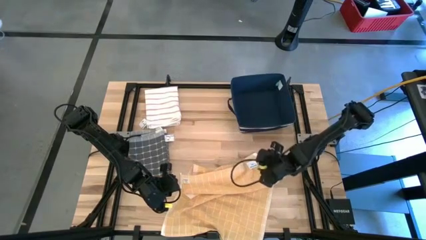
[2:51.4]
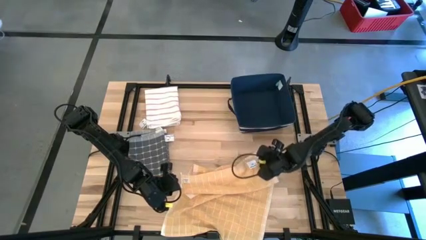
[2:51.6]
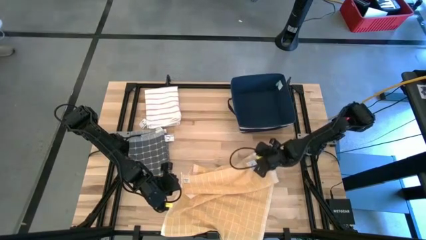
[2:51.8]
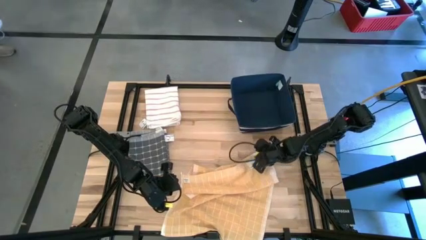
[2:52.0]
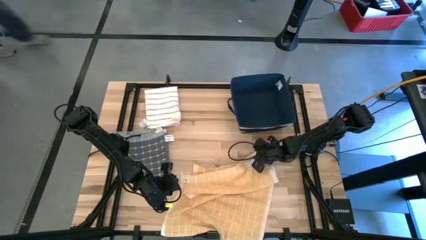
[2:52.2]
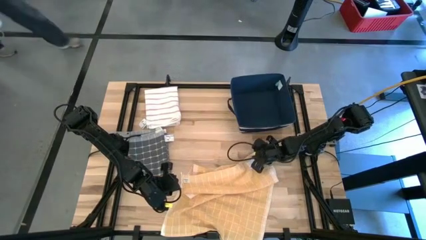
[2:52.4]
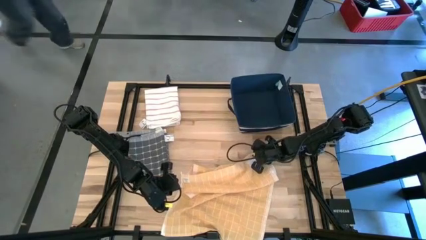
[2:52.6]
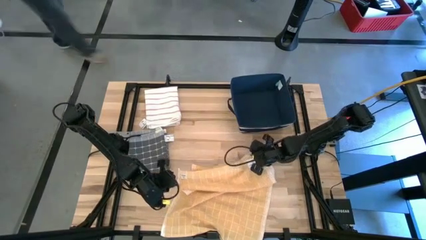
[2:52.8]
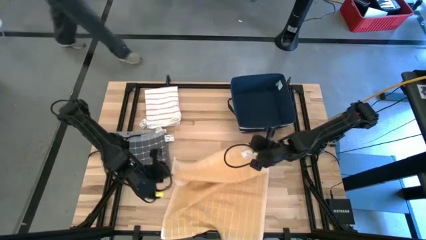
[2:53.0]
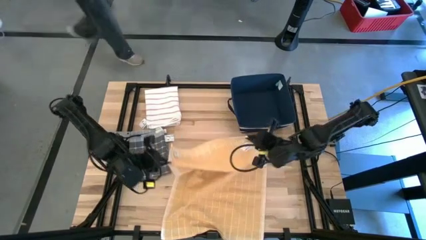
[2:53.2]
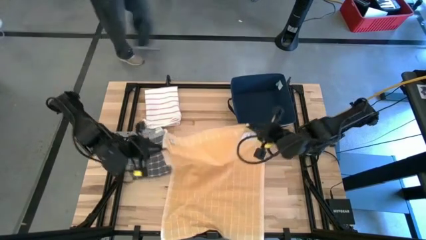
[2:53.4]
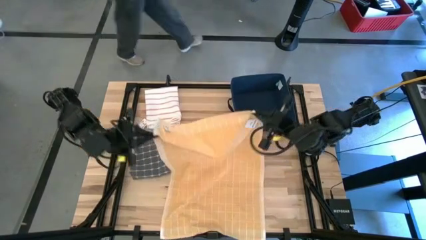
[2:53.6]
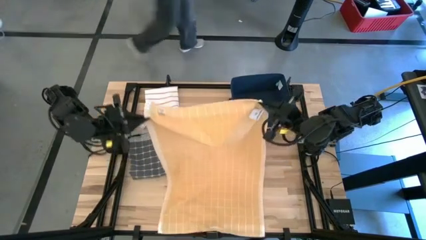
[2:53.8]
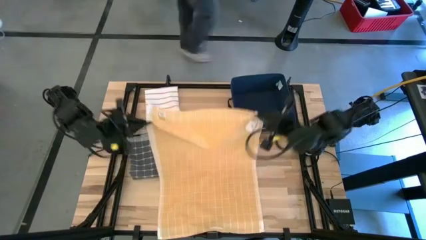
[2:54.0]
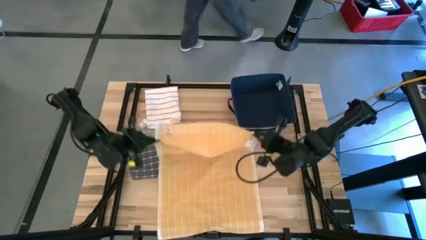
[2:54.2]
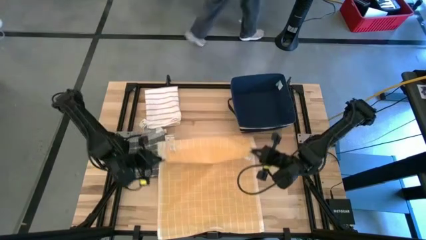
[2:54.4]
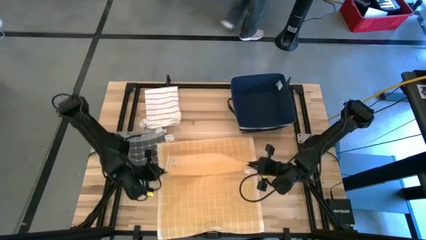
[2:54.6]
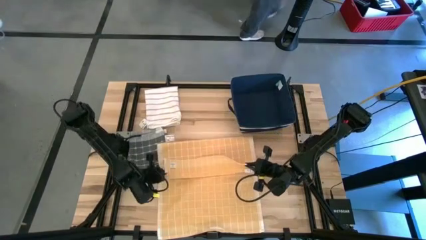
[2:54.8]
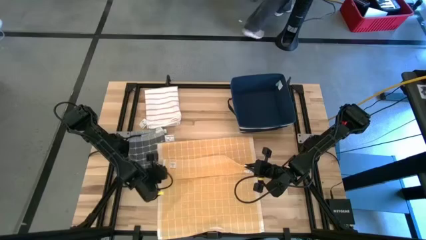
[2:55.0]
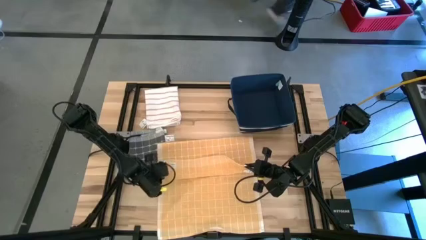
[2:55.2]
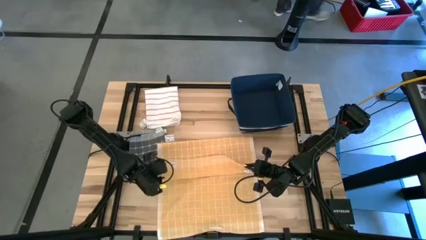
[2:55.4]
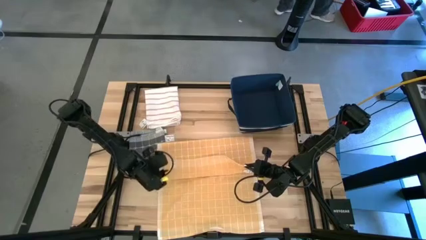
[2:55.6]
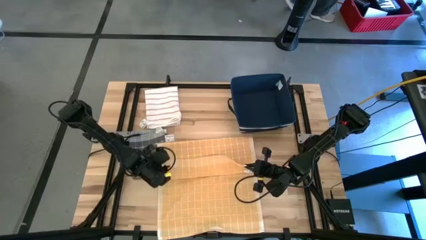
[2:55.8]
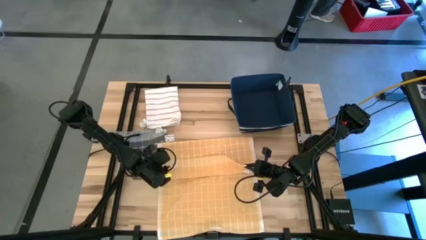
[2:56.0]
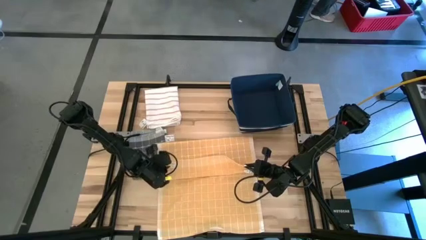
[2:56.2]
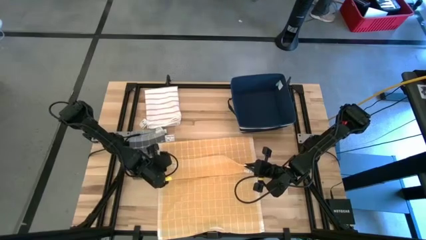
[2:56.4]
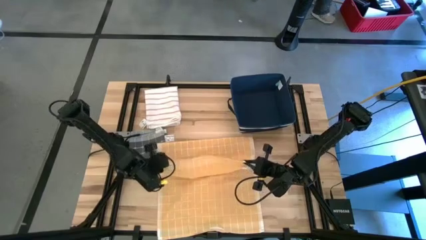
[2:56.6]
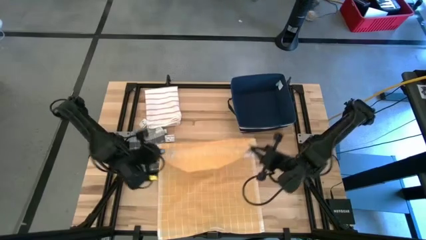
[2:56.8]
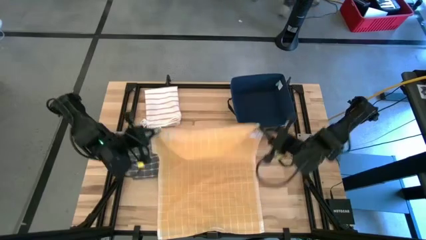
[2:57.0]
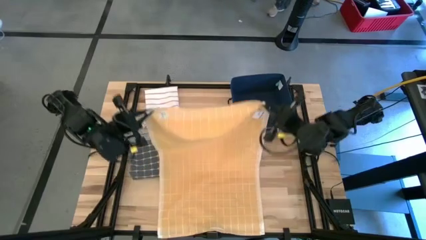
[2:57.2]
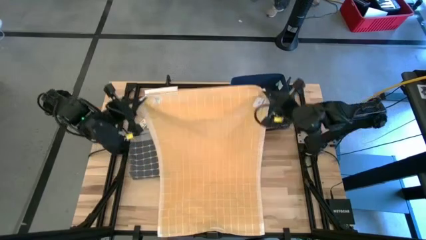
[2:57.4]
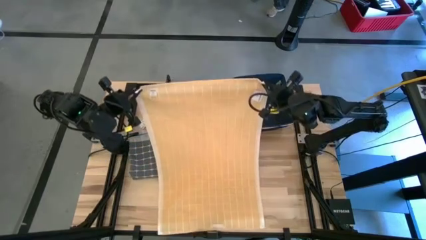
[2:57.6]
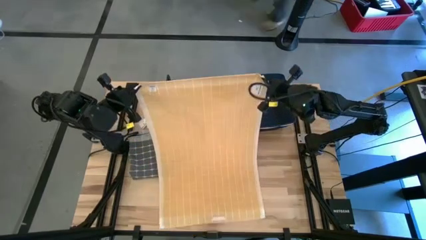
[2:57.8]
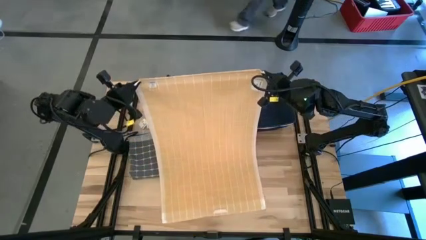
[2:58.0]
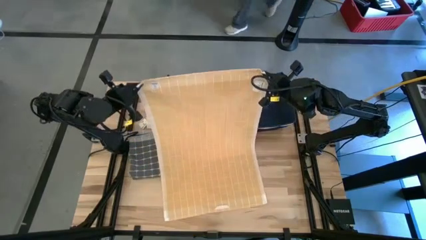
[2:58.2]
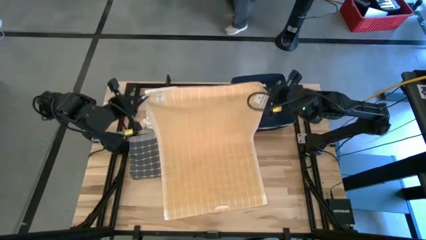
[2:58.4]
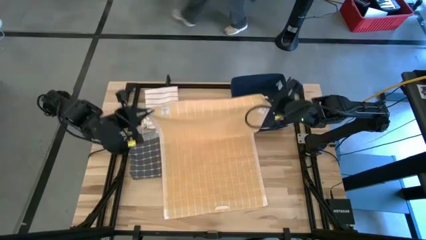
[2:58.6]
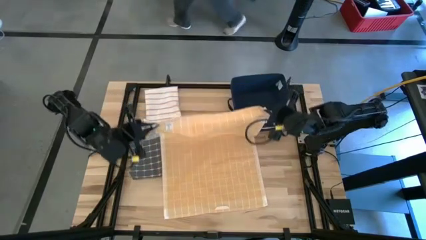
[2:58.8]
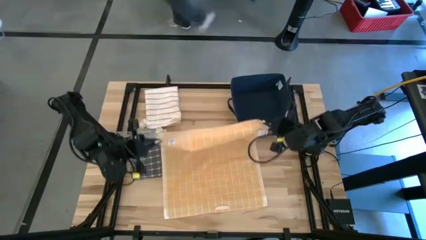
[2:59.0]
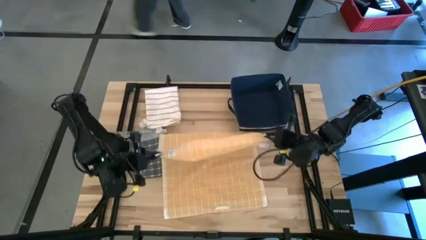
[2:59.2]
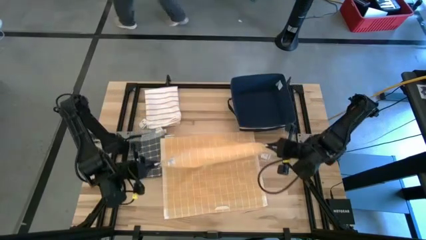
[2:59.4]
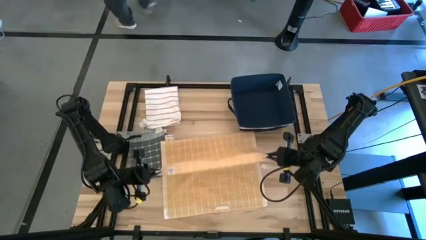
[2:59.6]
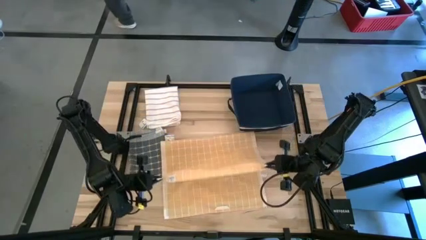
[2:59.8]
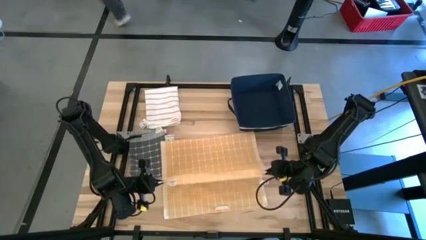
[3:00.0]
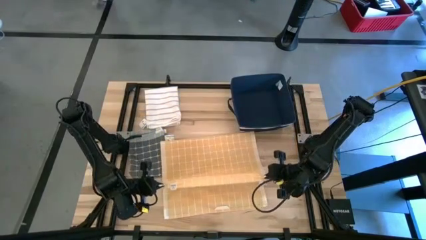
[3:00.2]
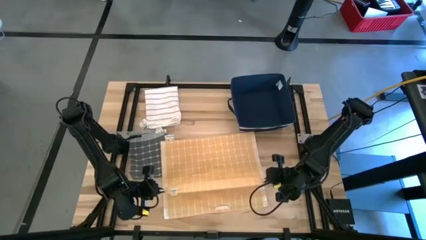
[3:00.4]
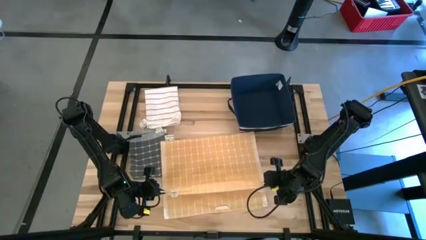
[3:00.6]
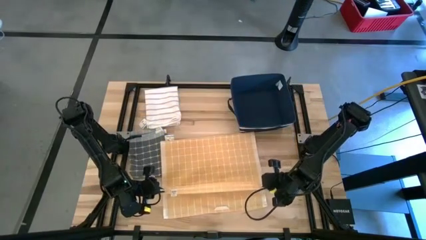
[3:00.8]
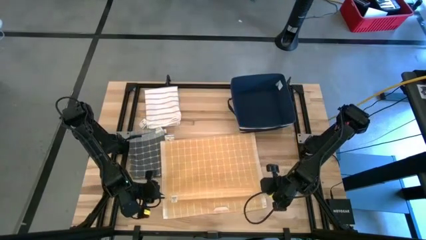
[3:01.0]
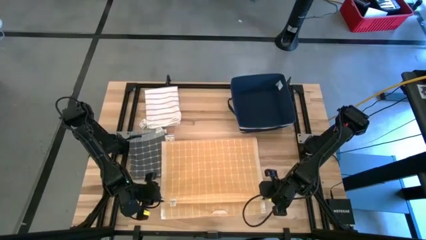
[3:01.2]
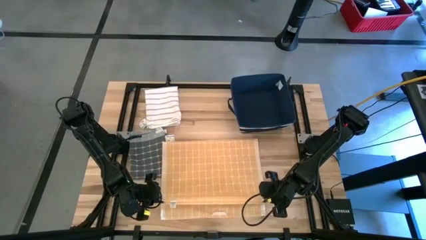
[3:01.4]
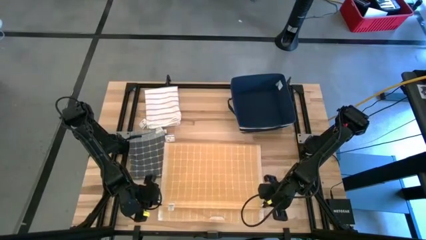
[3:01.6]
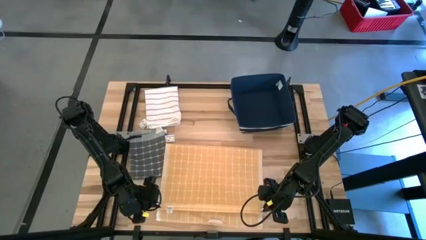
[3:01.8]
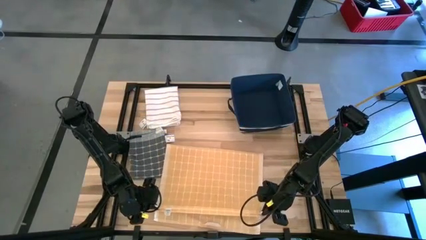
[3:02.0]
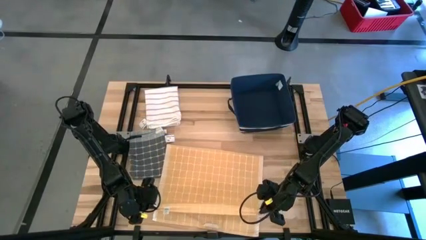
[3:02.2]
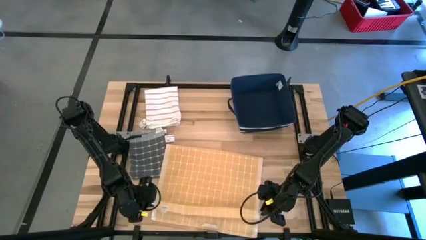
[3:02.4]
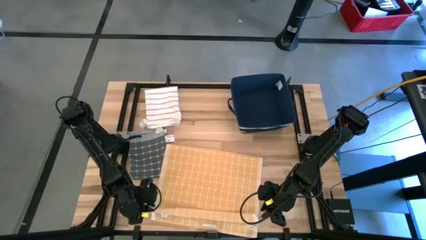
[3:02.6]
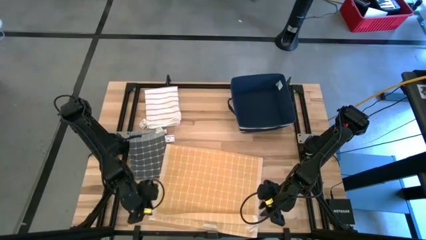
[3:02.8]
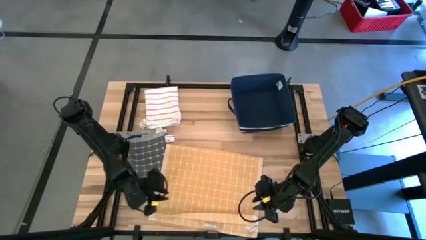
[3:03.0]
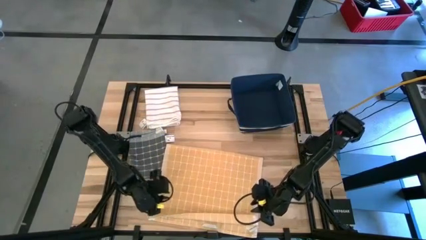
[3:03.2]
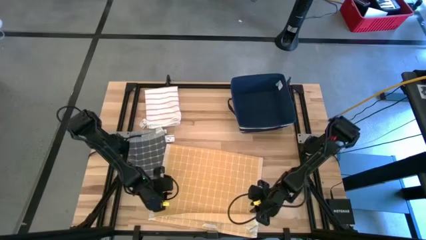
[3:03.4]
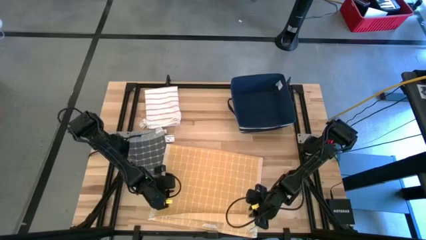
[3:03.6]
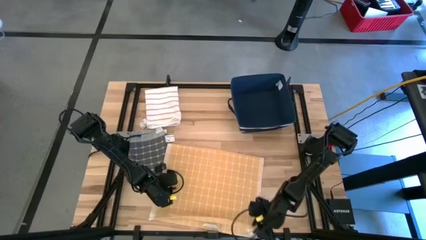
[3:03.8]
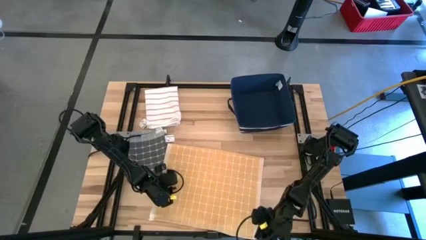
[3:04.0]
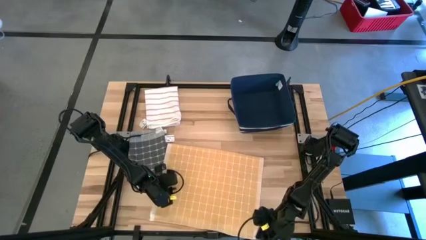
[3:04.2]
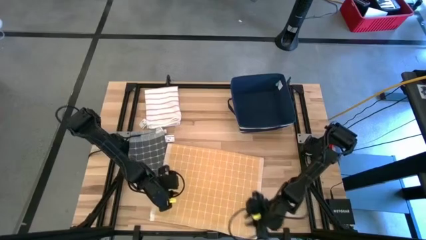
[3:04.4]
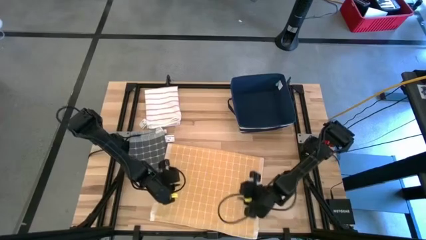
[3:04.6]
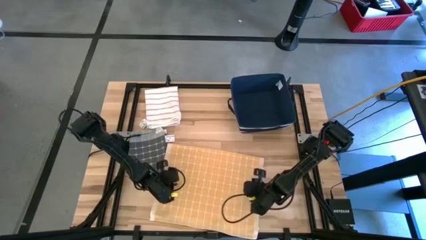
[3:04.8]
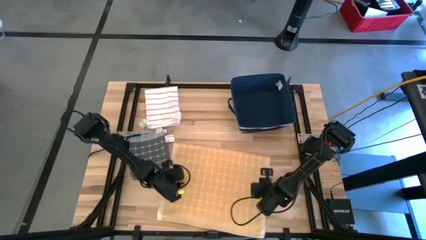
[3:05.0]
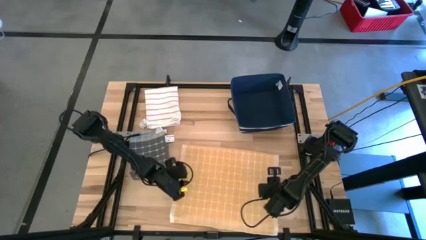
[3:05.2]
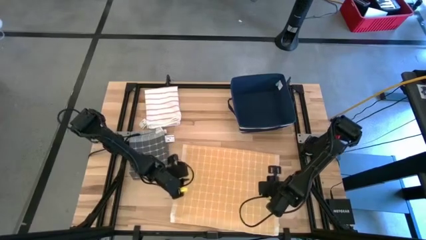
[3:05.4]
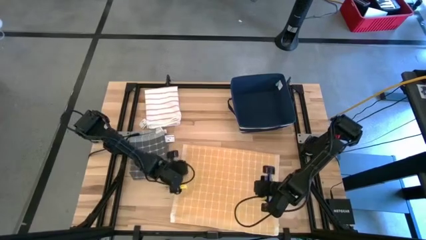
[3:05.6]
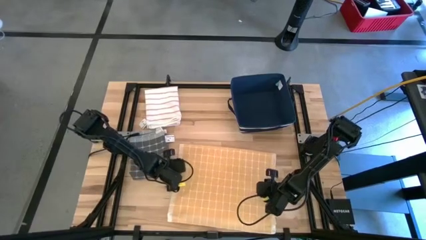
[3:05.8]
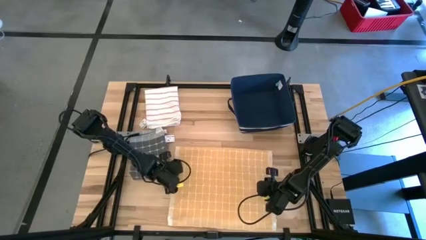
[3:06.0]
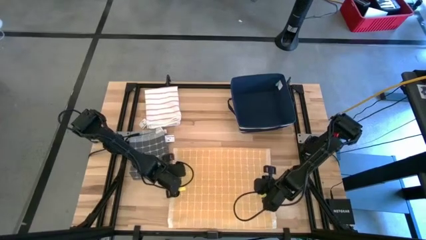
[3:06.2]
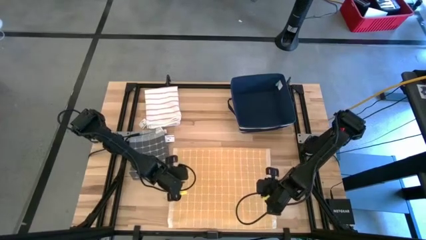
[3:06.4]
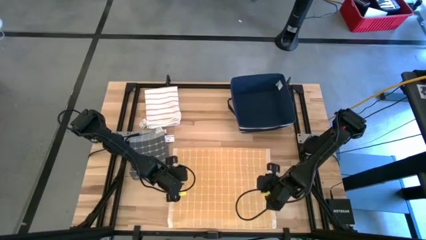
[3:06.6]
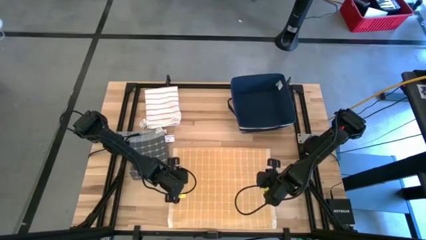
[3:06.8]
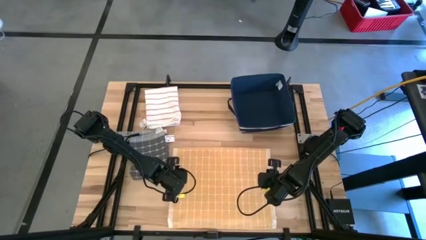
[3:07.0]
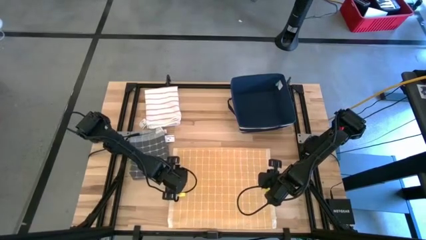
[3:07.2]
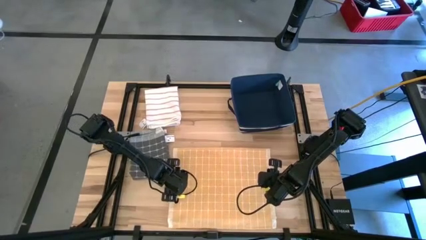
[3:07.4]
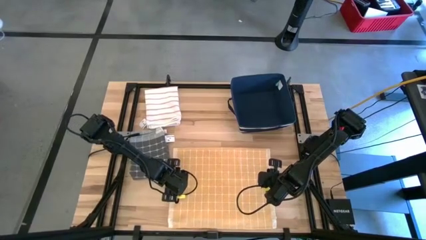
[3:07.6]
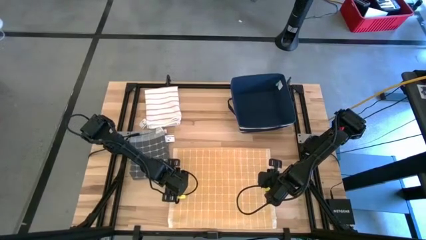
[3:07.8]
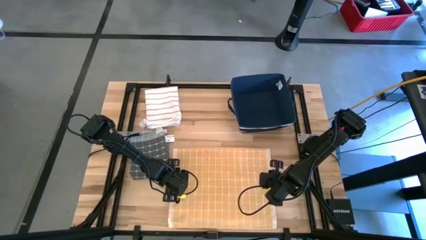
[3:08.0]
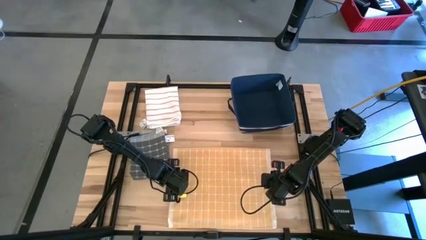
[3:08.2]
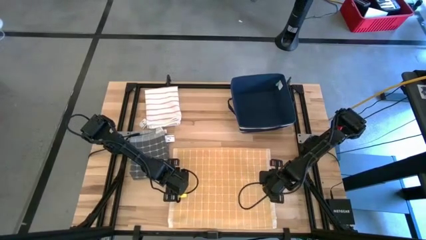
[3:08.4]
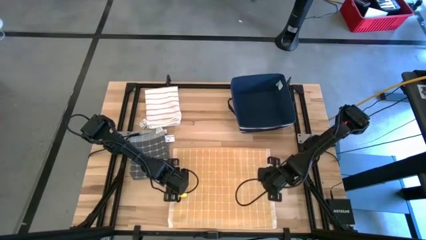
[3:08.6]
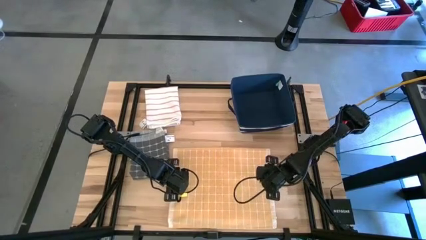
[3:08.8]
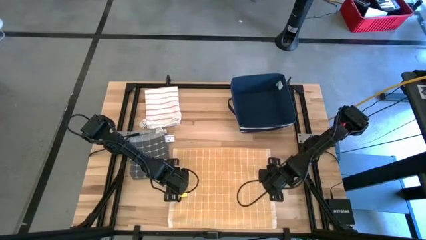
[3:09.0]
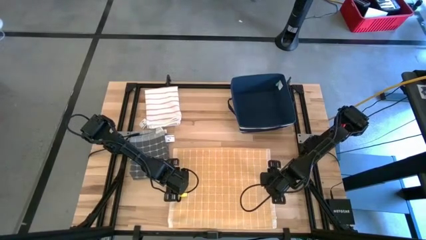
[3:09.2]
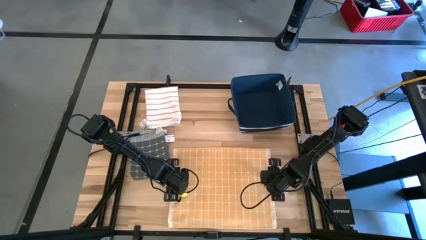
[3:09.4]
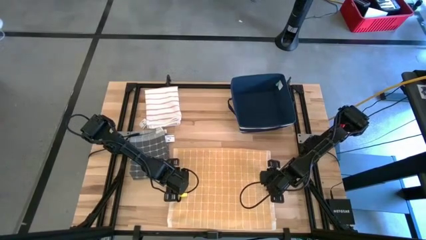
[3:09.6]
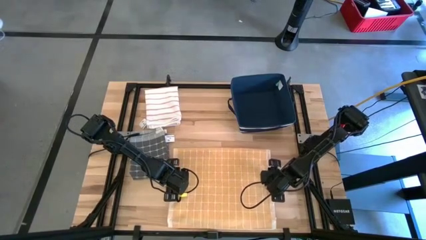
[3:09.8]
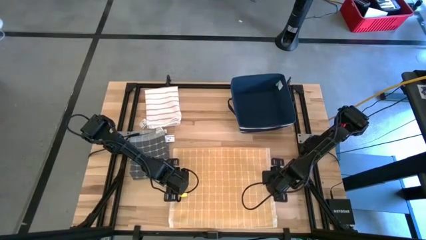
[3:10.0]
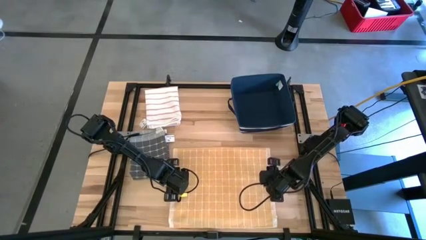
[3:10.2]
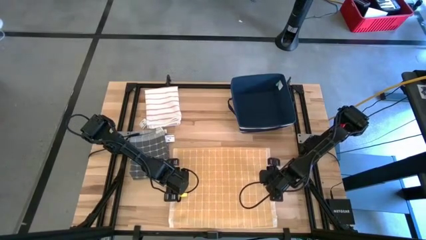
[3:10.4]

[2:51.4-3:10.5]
Task: Fold towel
Fold the orange towel
